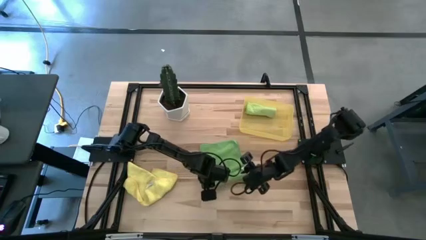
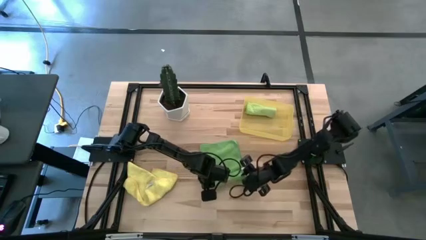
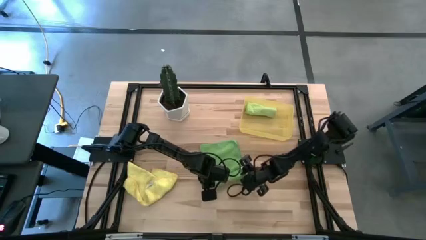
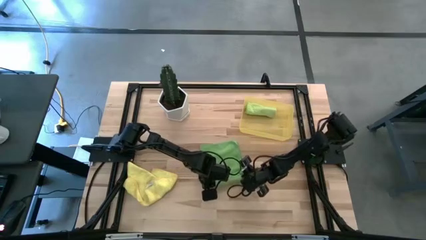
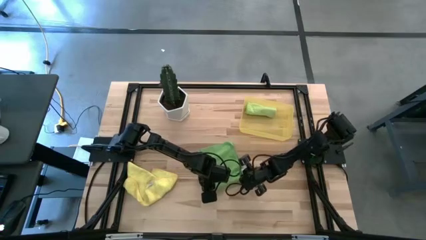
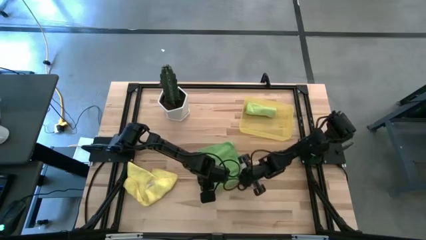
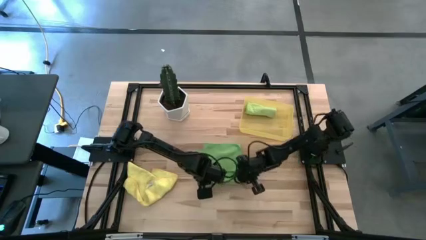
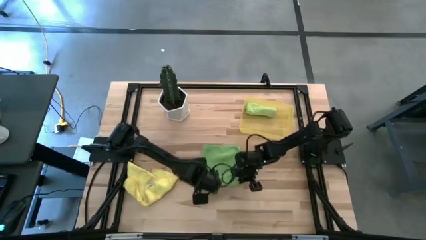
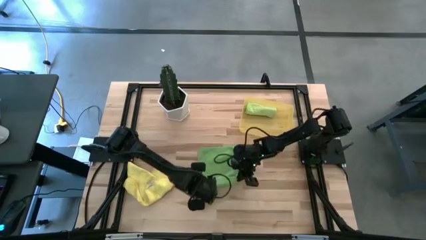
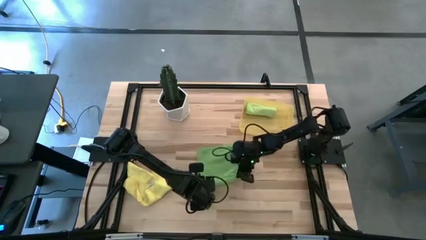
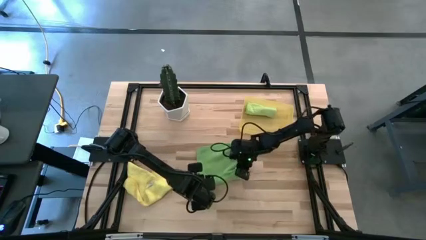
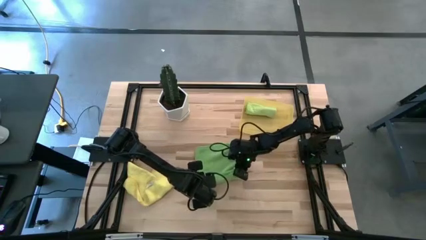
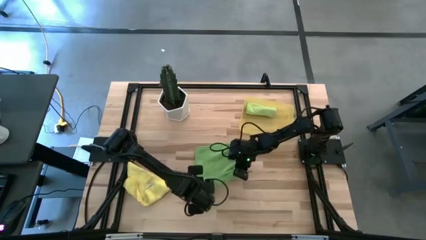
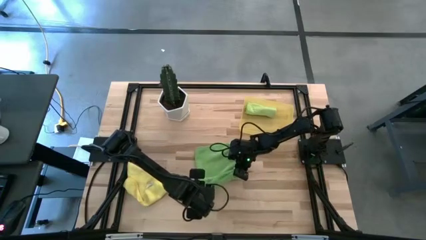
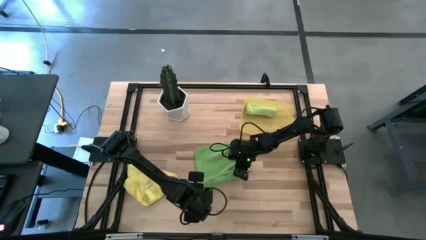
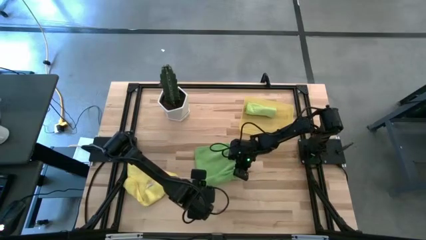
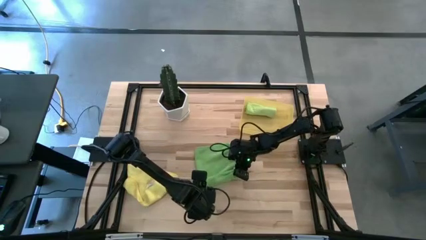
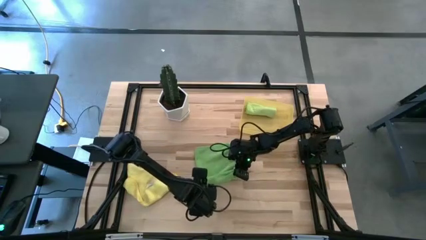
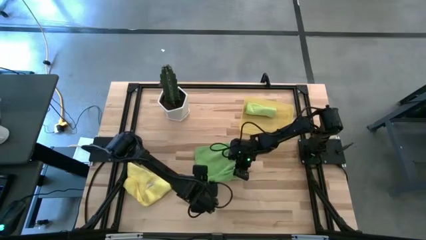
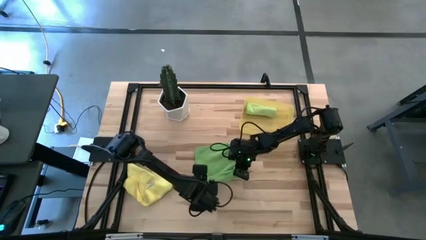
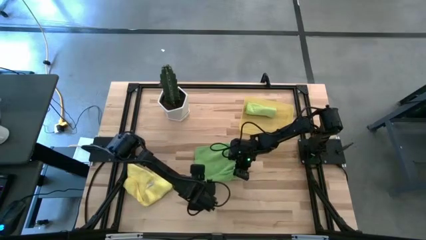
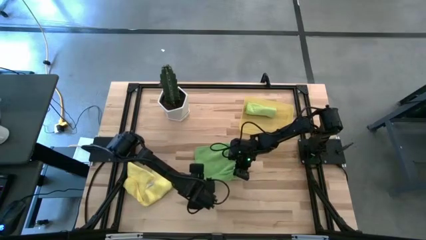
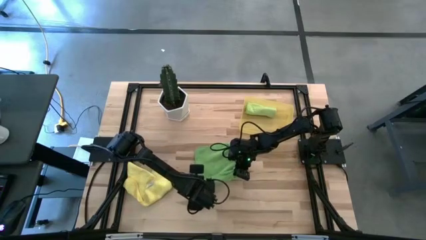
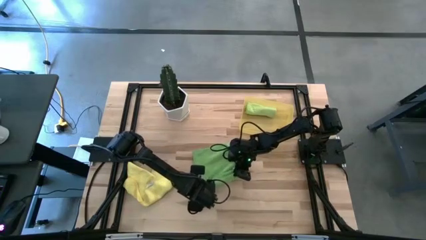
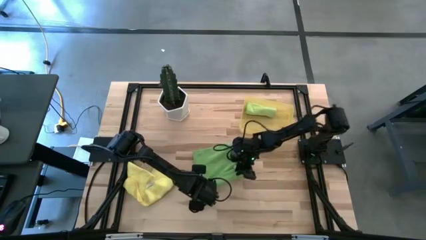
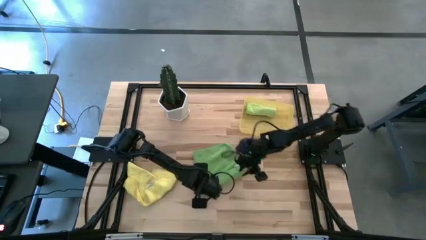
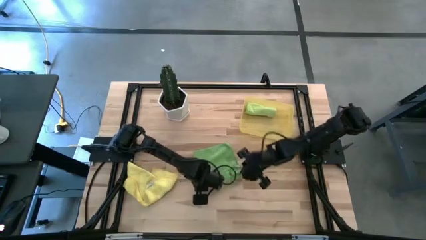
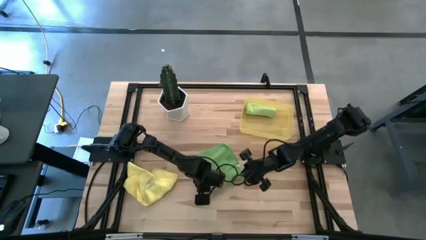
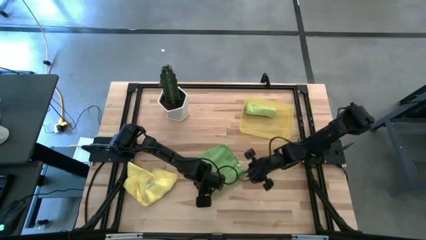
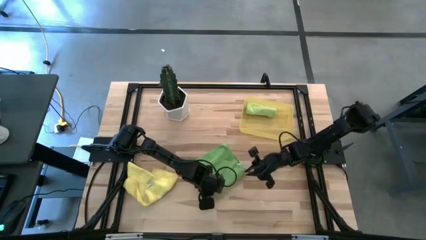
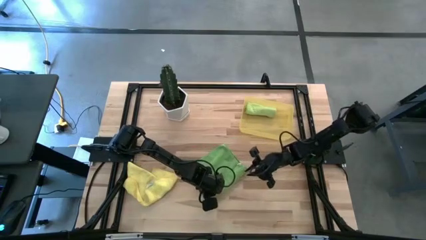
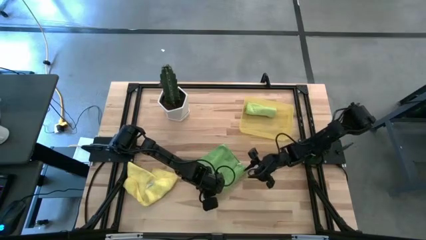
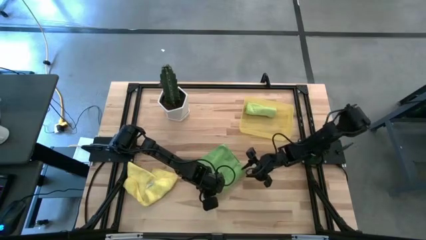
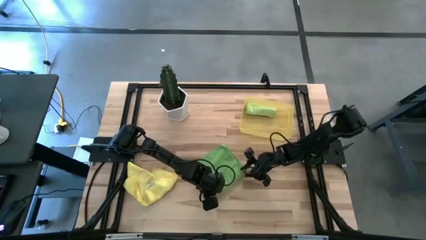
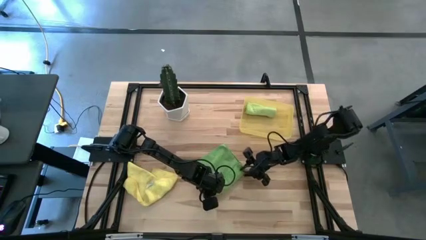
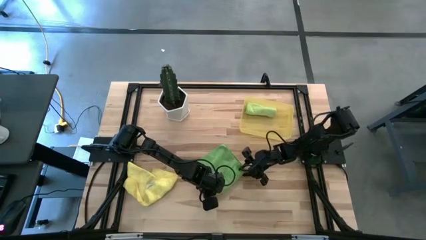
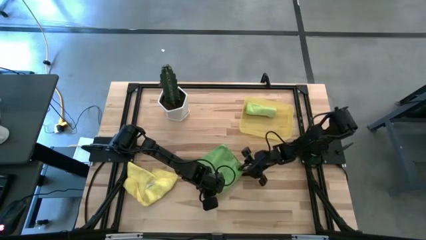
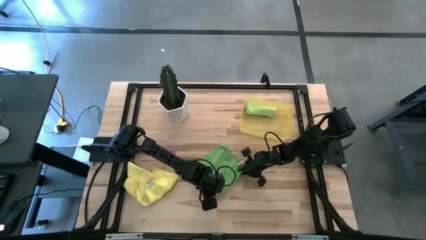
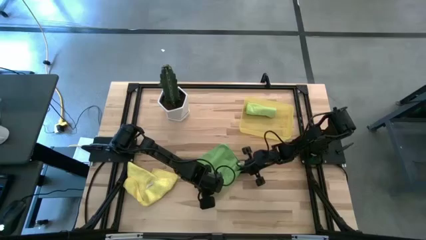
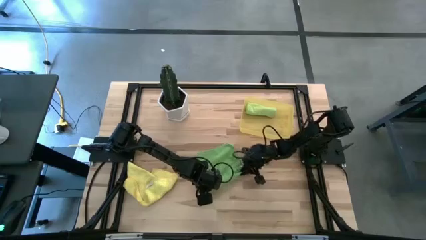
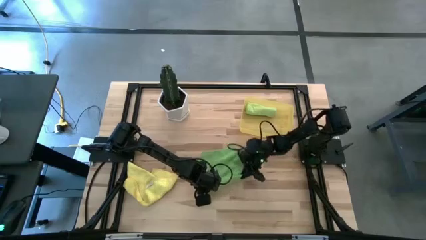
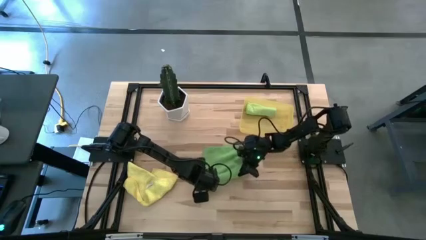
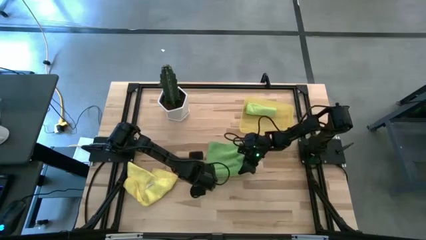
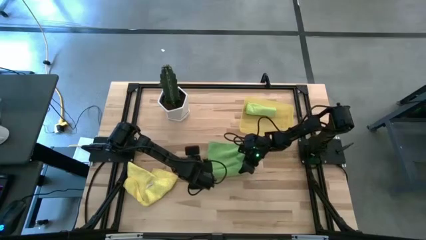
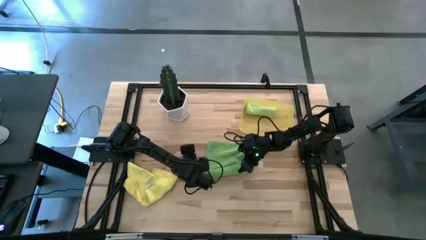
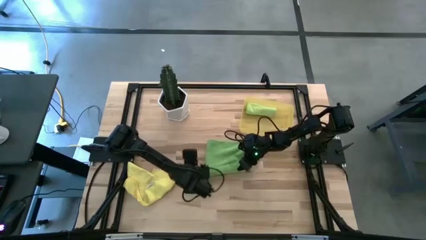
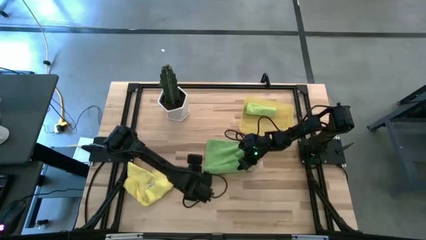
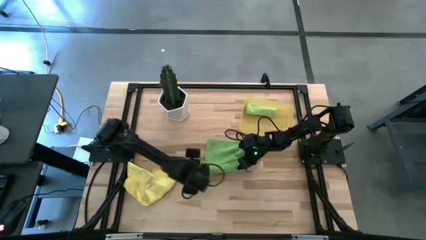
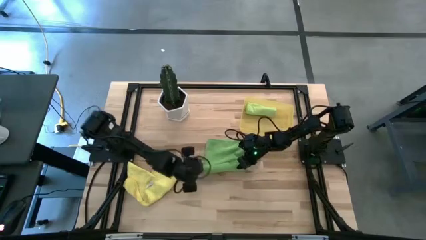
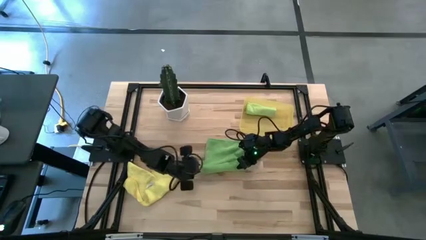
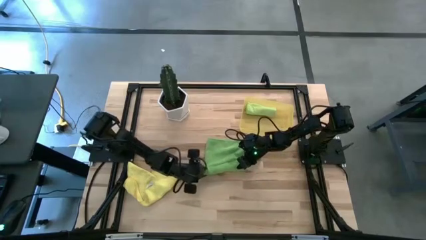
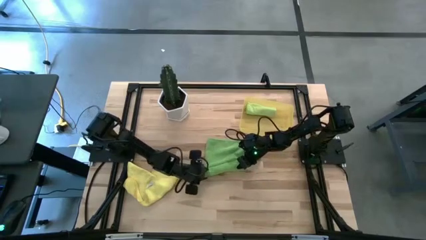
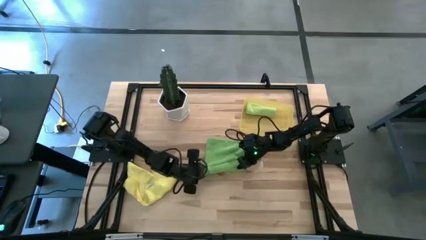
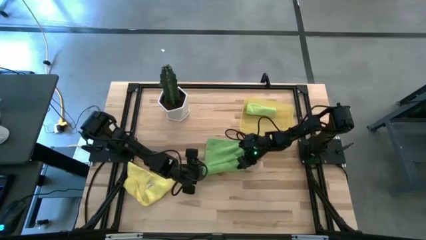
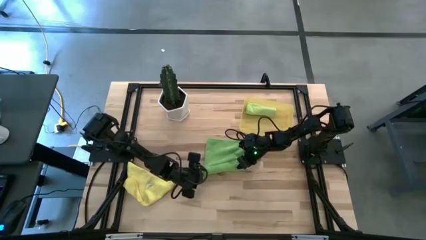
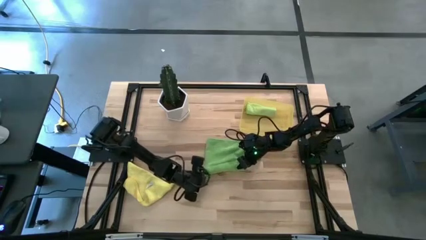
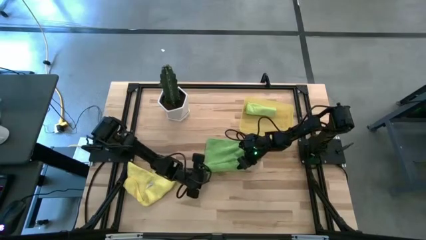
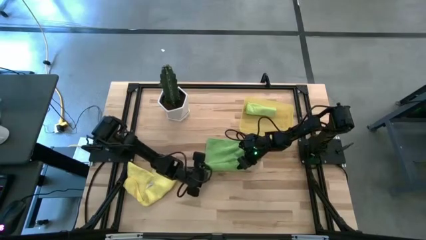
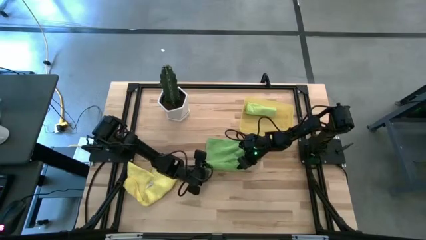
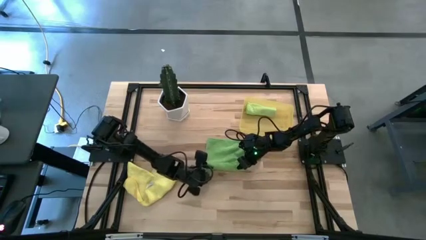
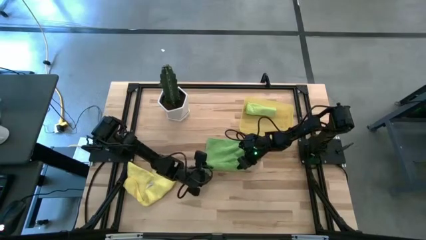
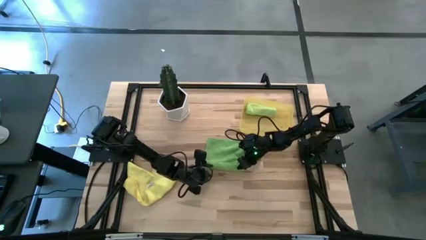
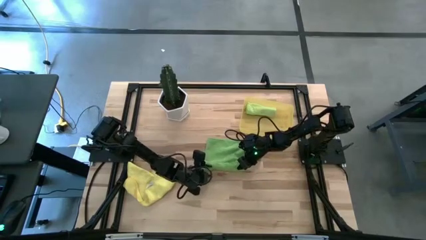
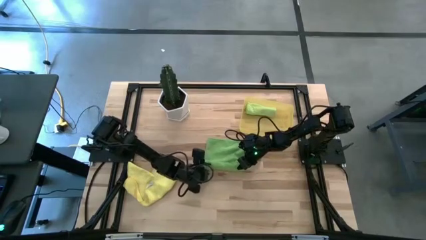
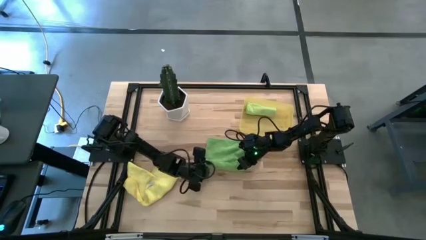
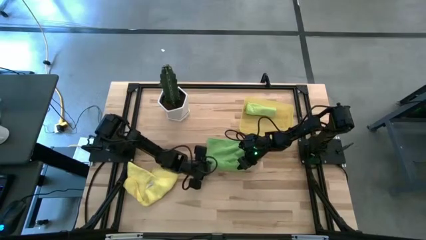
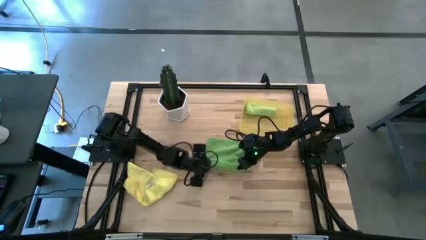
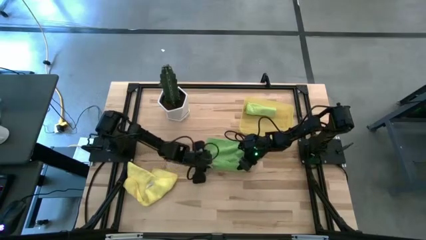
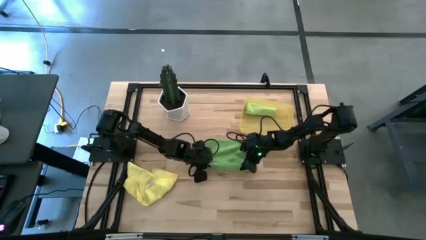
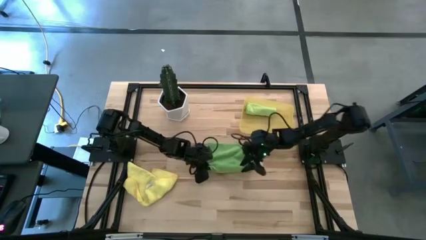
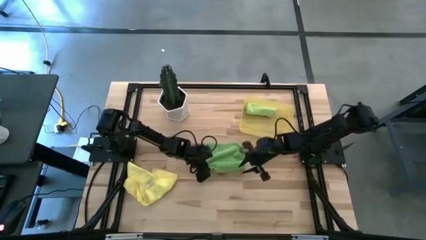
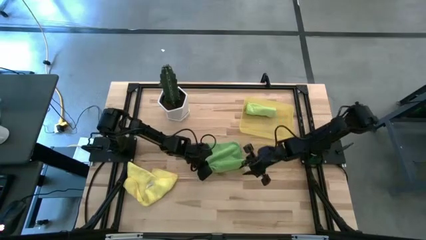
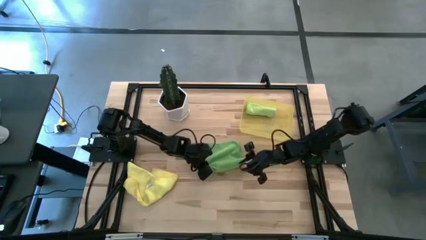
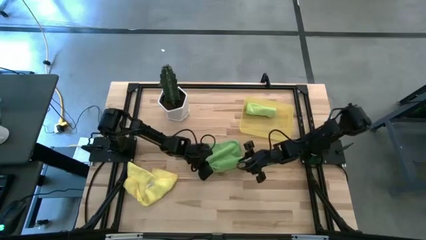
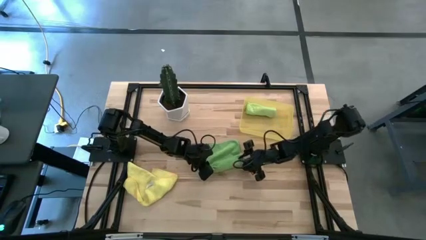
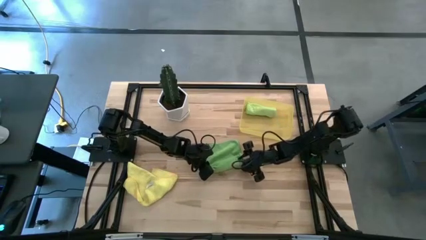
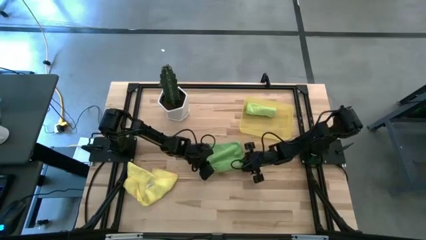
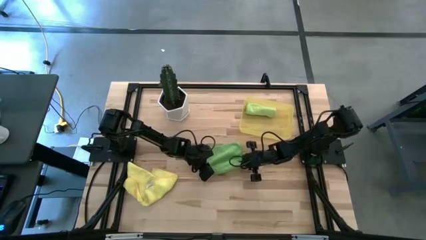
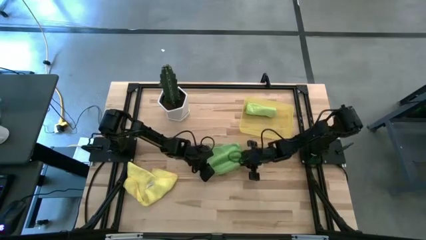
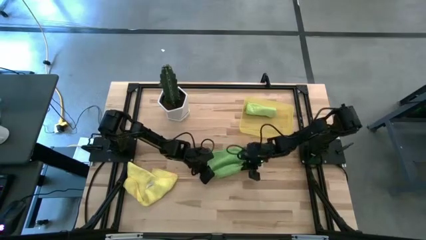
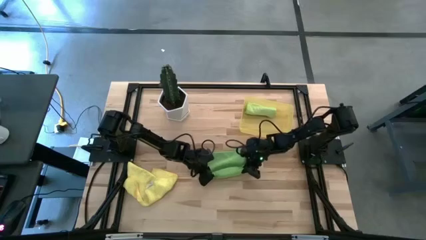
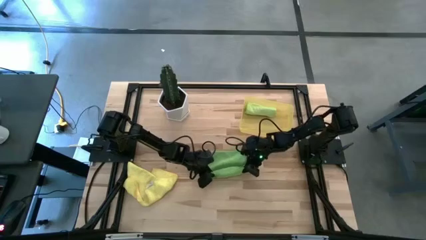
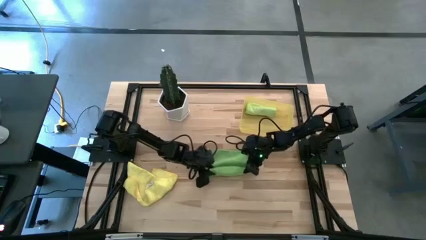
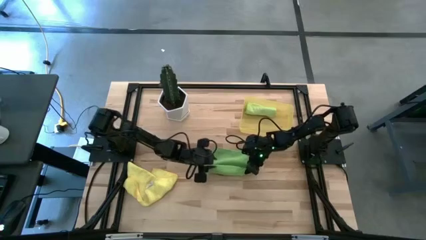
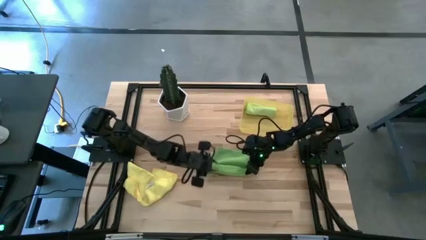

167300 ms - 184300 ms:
Task: Roll microfiber towels into tight, uniform cylinder then place into a basket
Roll the green microfiber cloth
